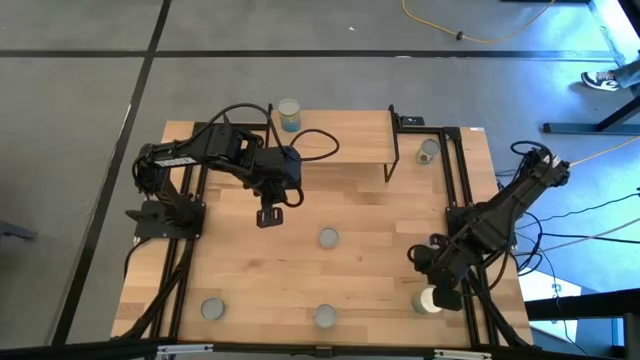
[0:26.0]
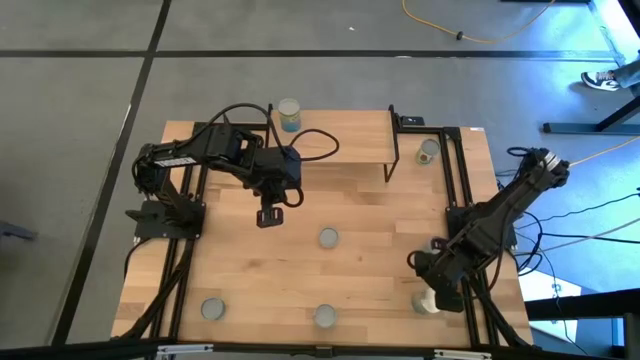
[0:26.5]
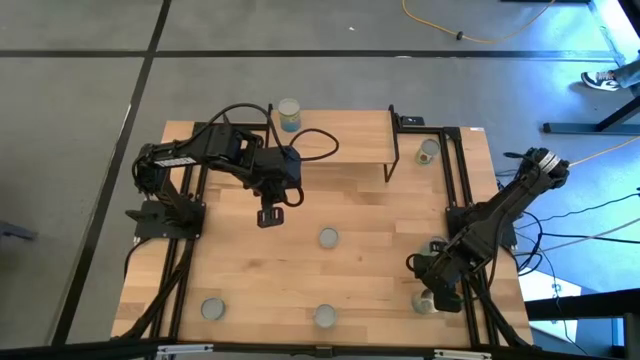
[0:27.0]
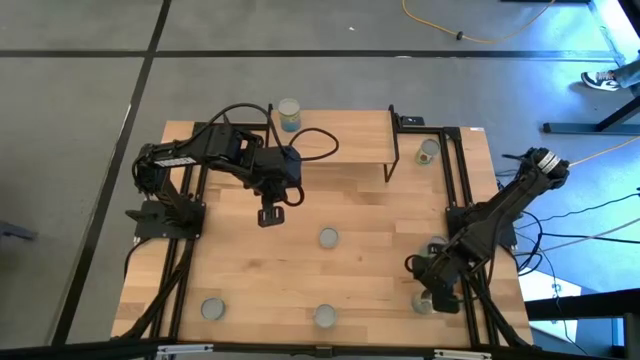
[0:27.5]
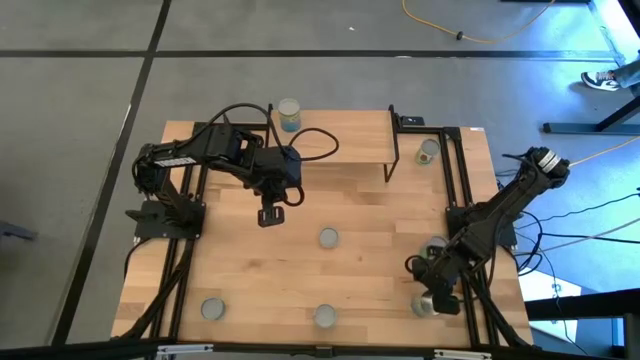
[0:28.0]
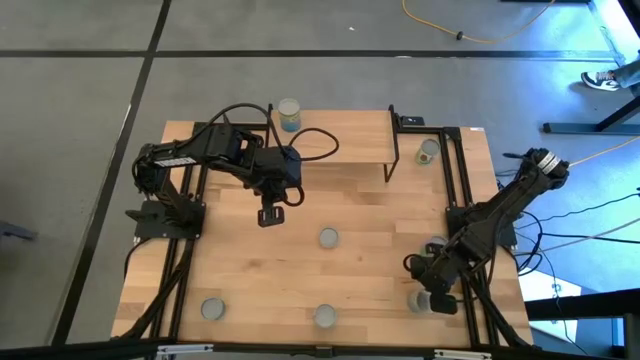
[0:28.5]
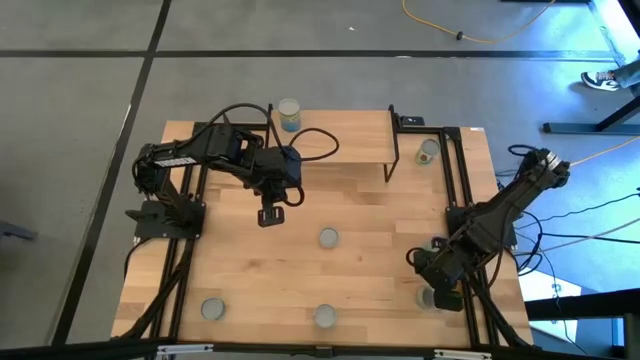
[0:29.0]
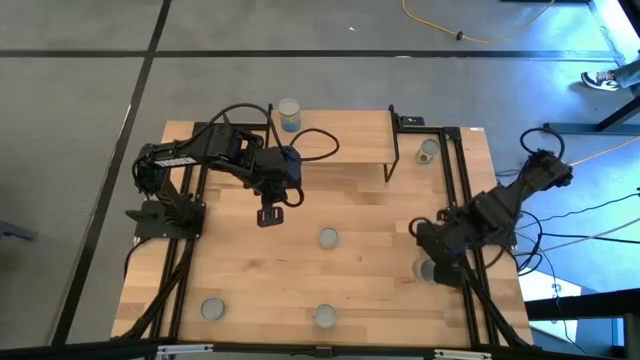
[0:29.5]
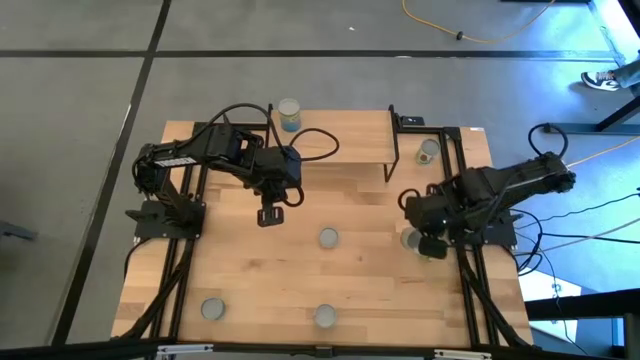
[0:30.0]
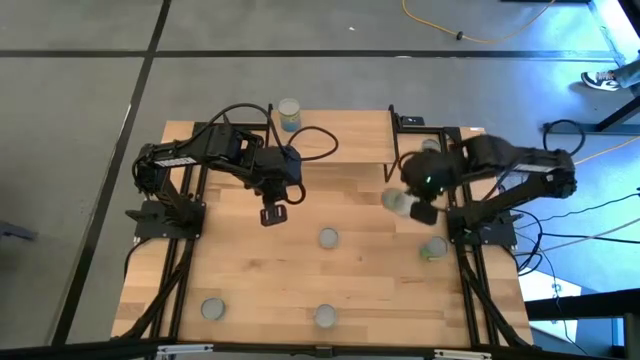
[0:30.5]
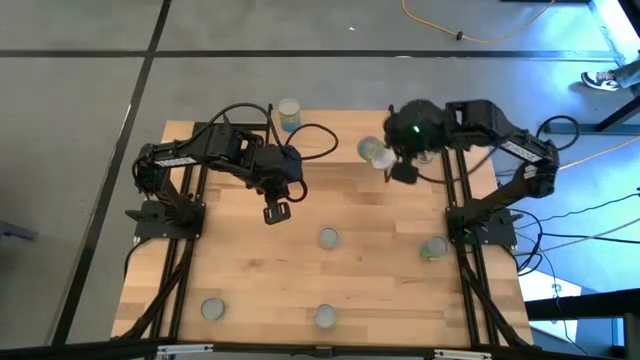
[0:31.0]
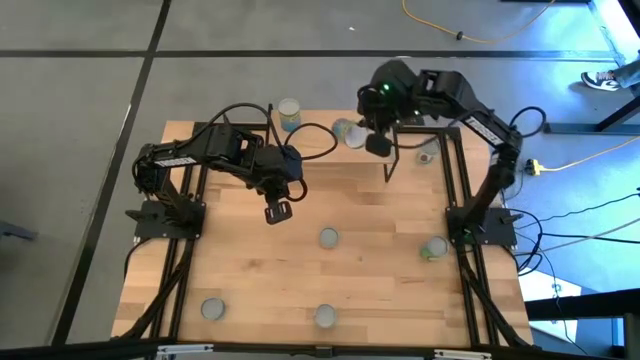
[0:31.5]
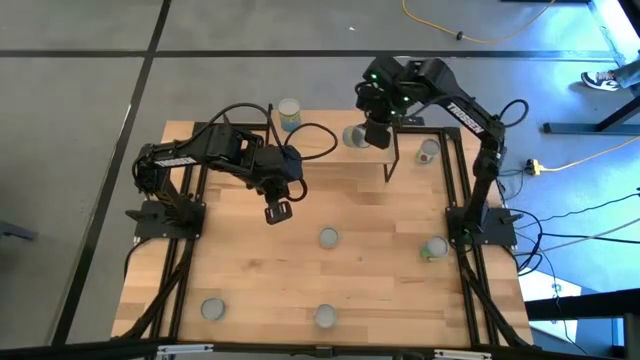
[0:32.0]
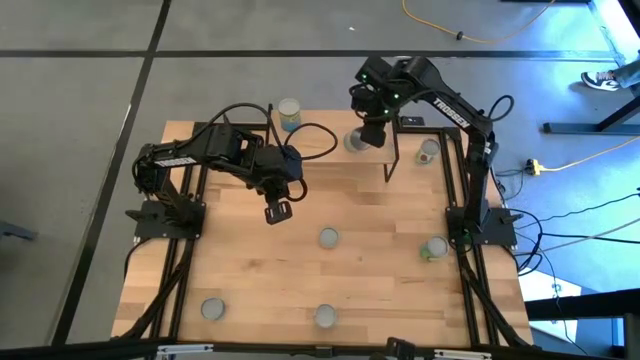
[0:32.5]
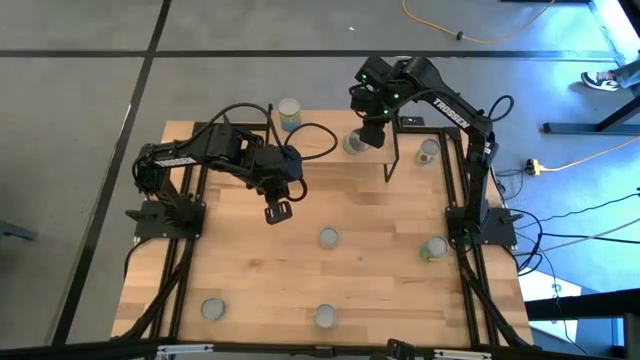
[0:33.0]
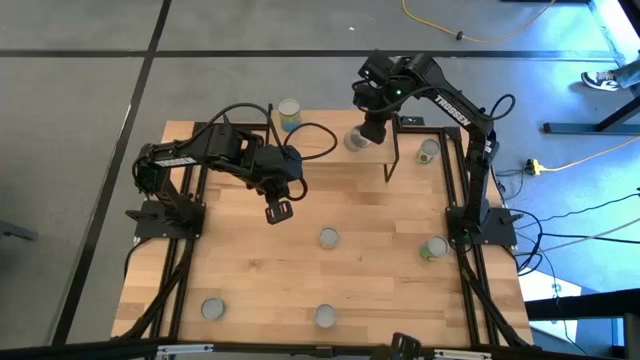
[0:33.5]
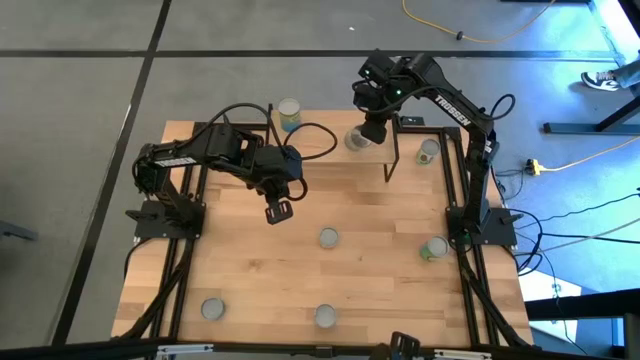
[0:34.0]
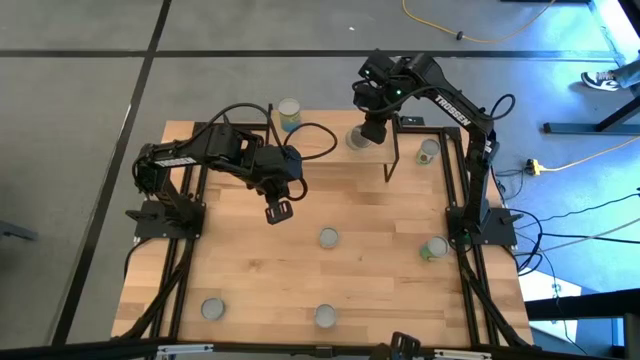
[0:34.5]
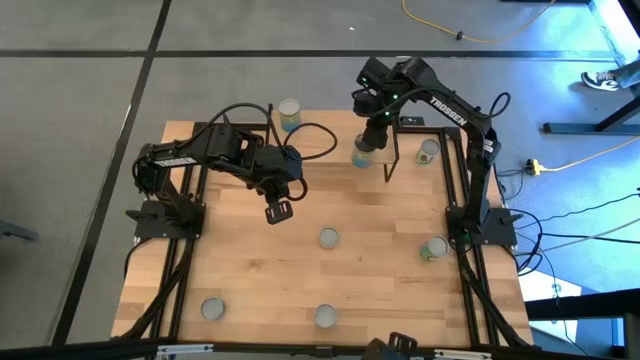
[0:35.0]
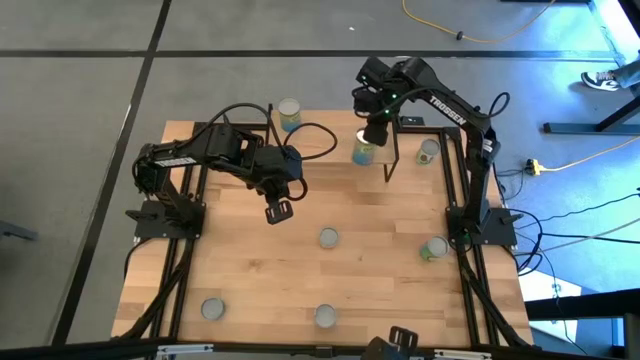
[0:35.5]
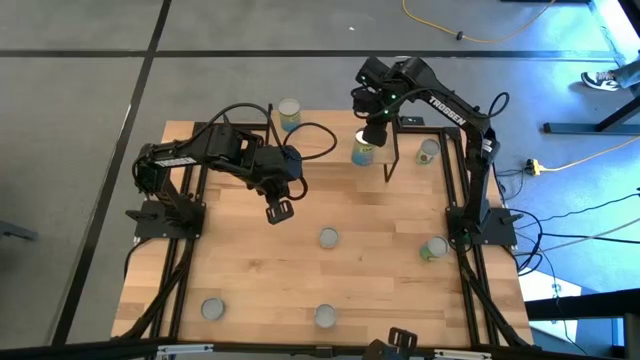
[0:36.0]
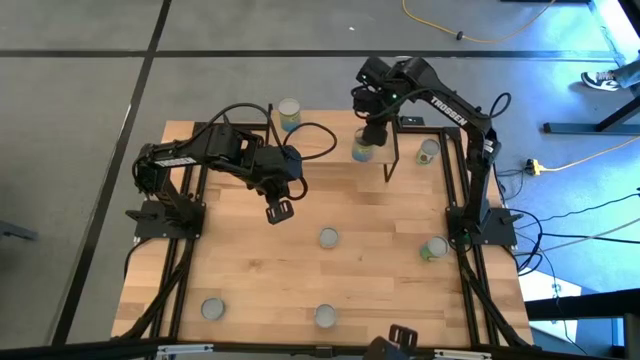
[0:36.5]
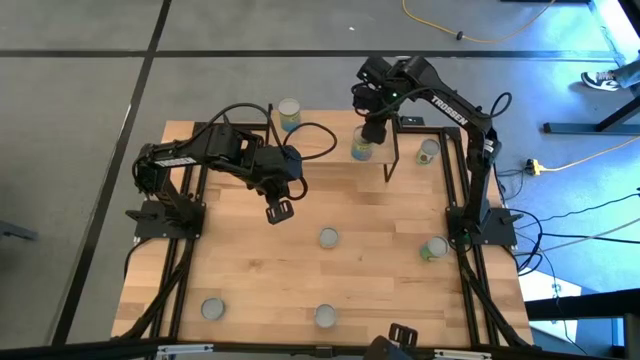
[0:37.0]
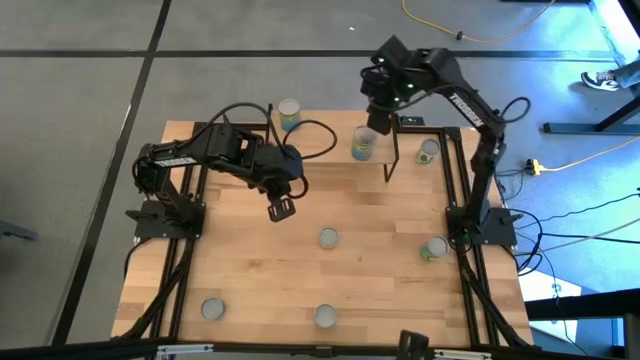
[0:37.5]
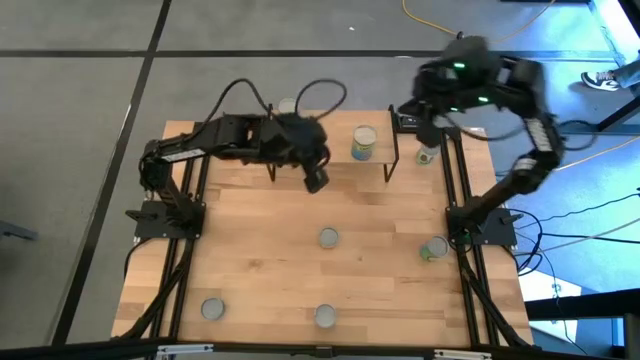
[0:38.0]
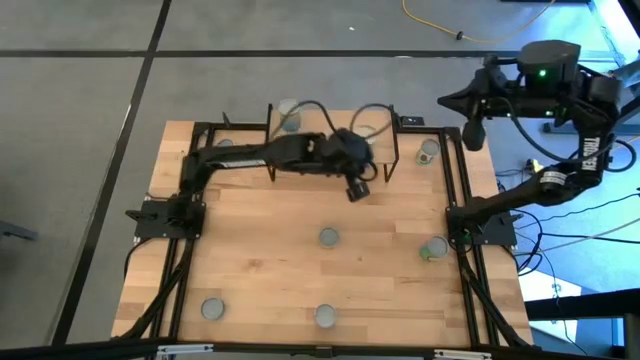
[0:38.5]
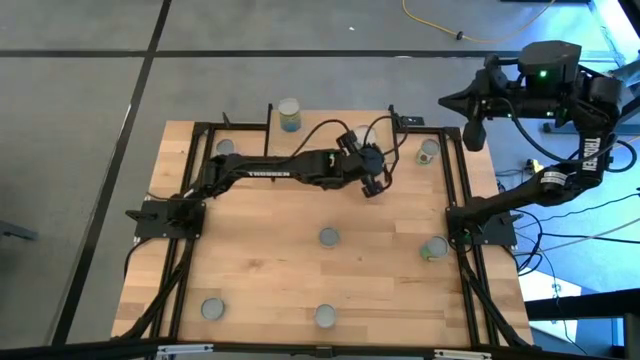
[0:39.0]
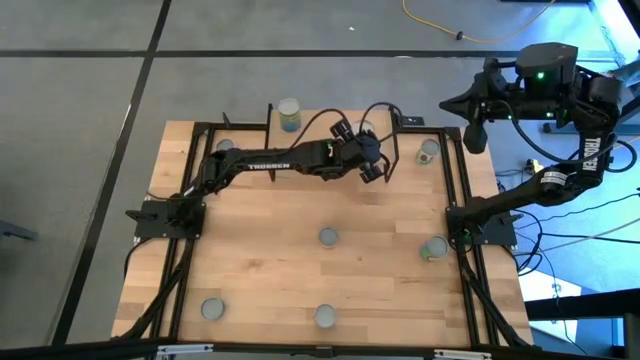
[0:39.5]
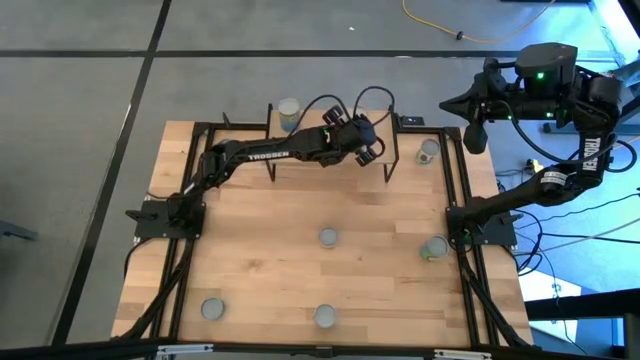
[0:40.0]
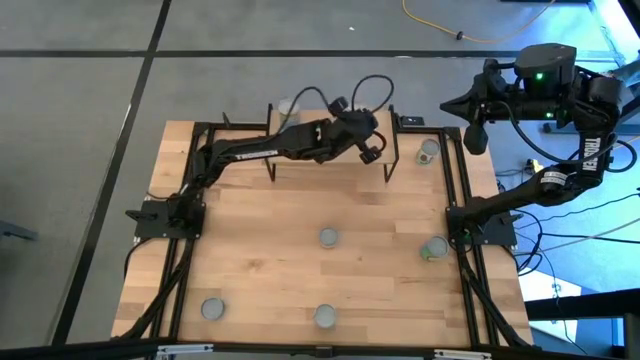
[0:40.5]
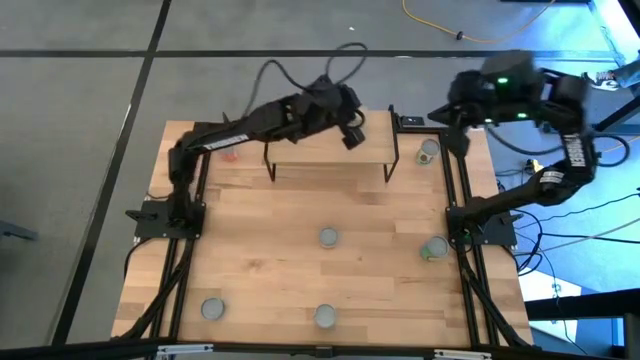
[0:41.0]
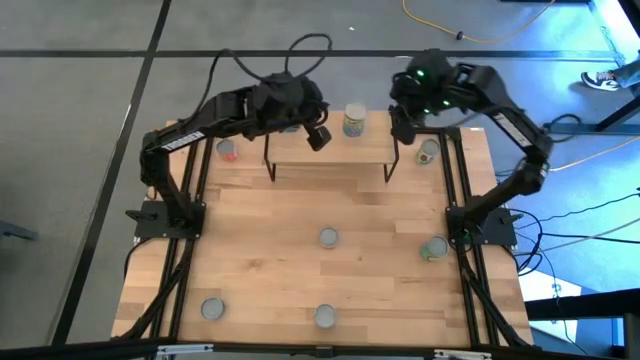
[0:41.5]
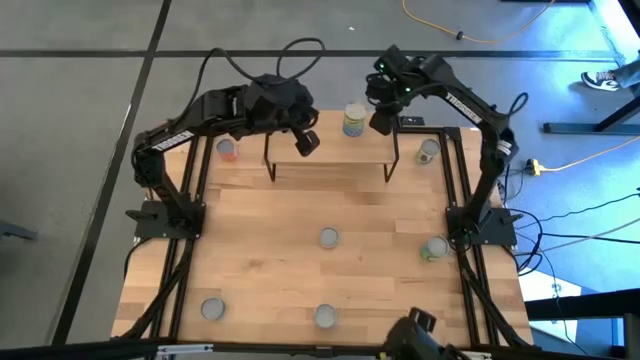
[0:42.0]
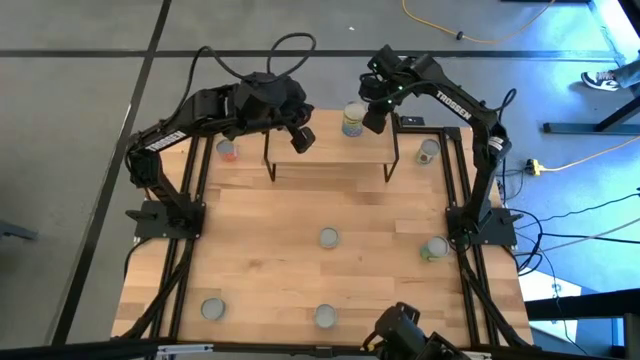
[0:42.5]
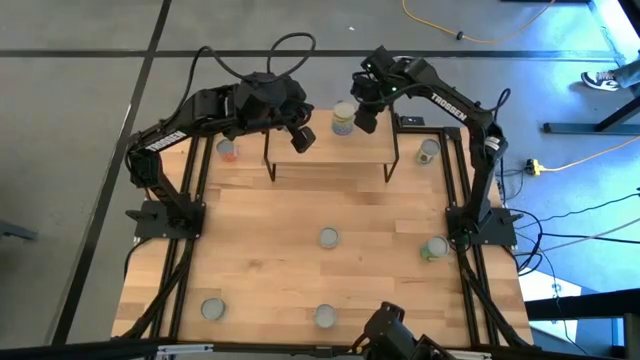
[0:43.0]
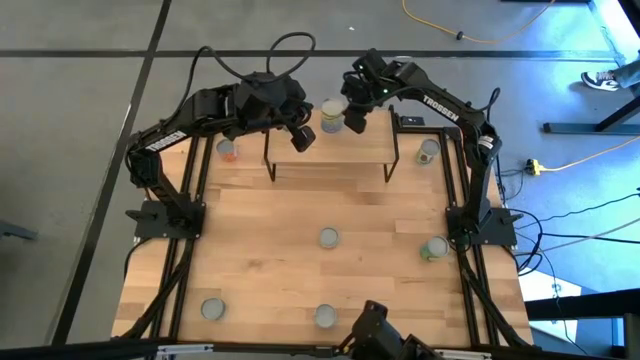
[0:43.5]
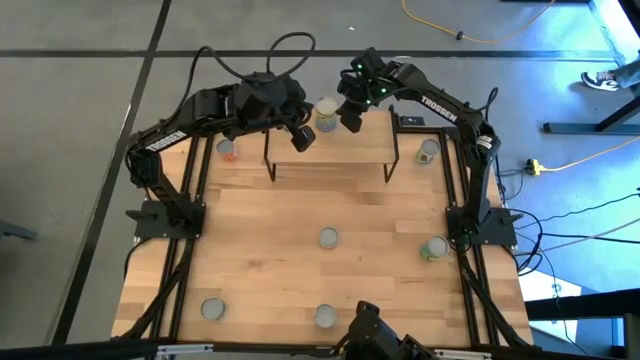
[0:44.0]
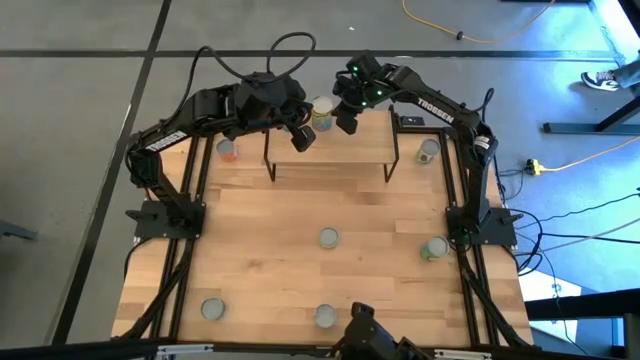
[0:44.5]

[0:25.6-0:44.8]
Task: Pick and place cans onto a shelf
Put the canned cherries on the shelf
